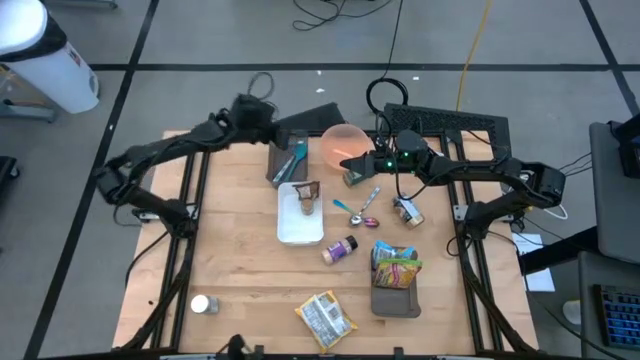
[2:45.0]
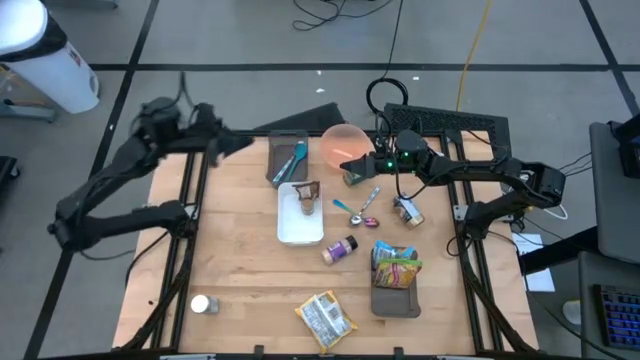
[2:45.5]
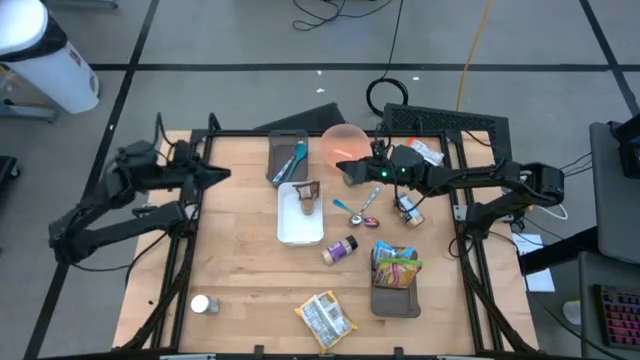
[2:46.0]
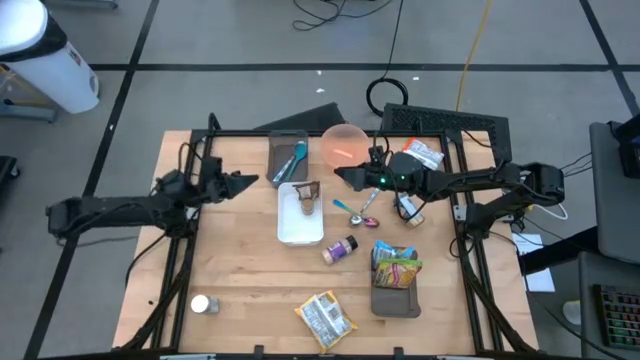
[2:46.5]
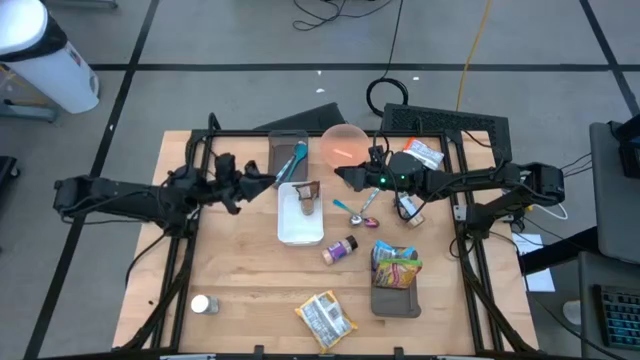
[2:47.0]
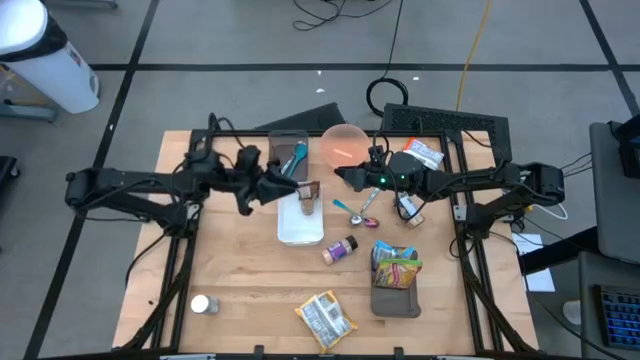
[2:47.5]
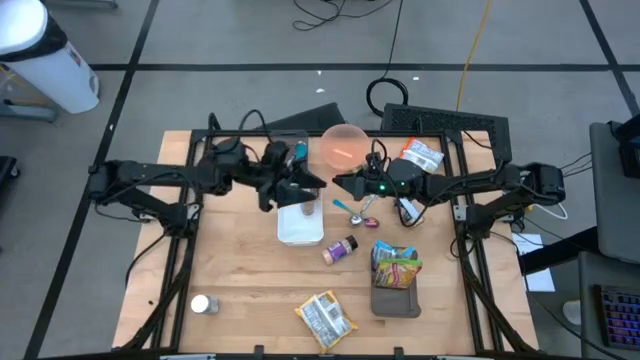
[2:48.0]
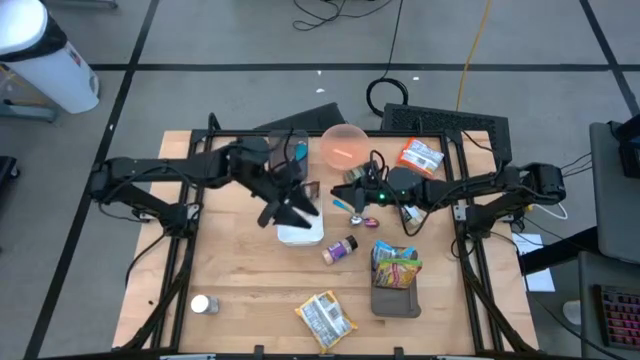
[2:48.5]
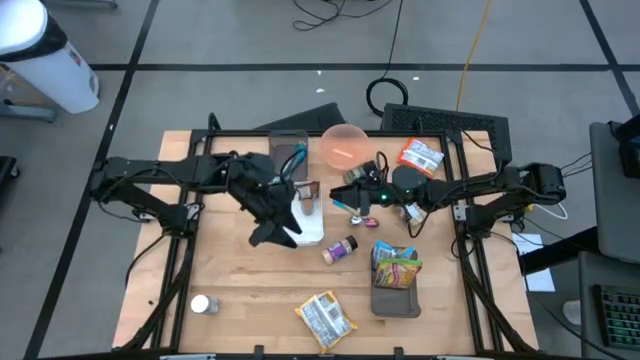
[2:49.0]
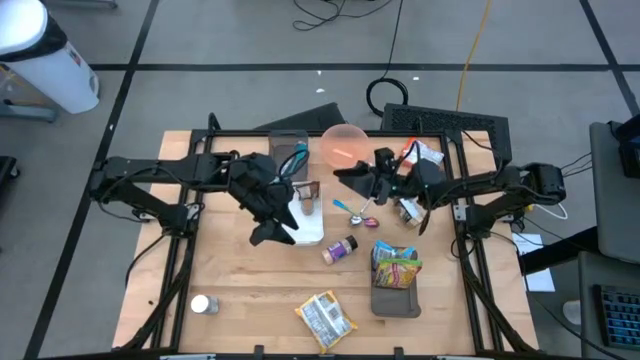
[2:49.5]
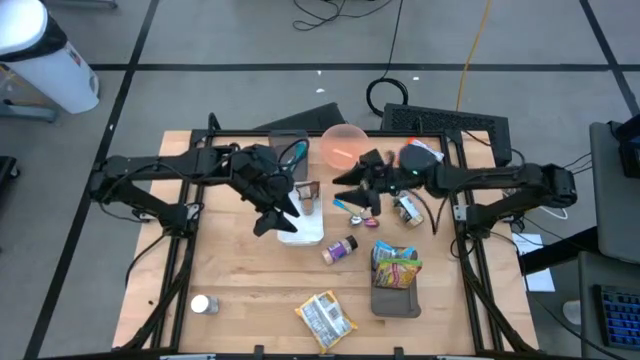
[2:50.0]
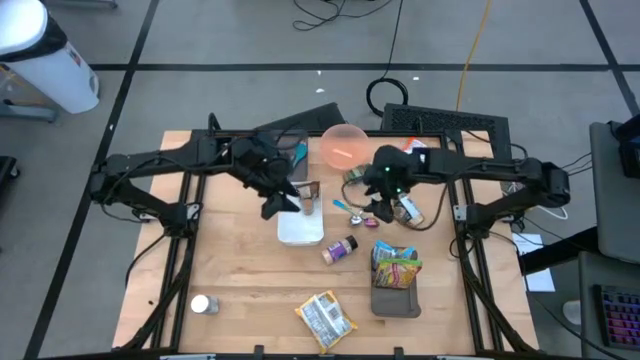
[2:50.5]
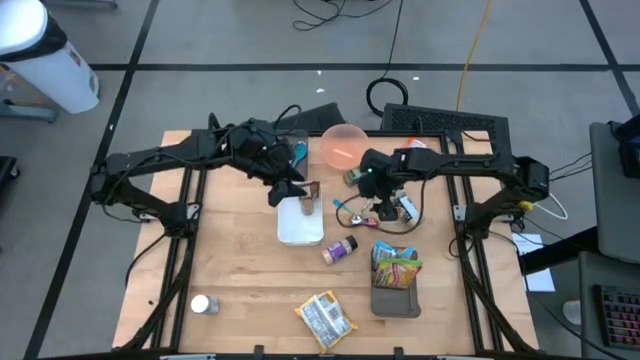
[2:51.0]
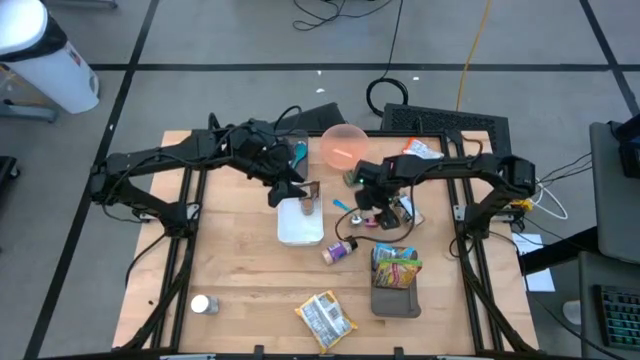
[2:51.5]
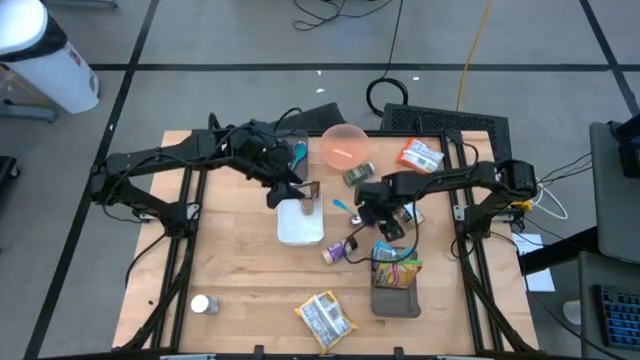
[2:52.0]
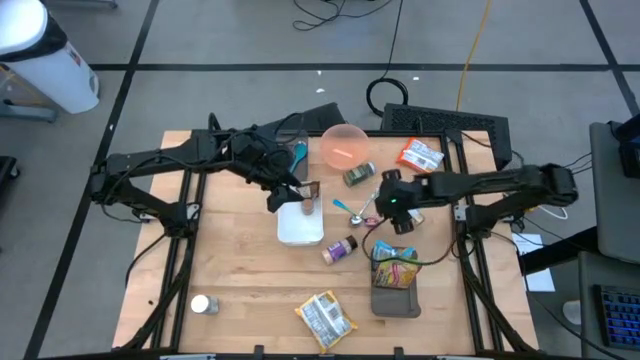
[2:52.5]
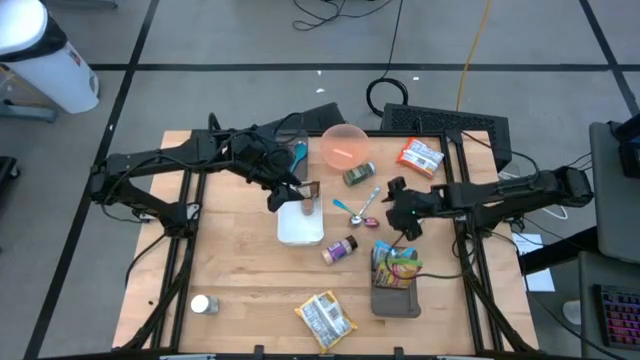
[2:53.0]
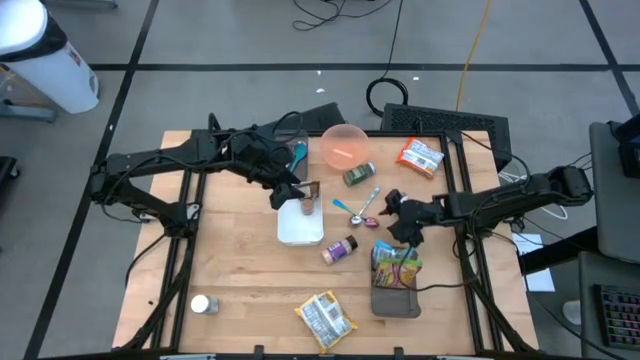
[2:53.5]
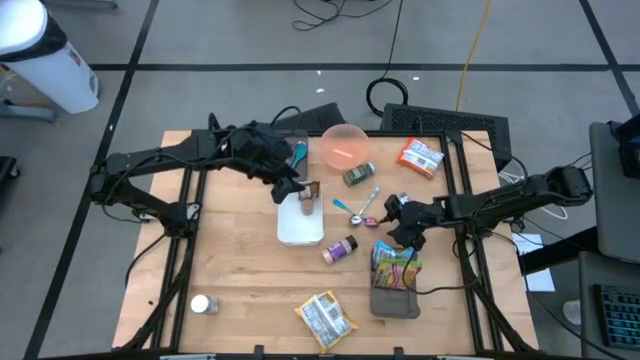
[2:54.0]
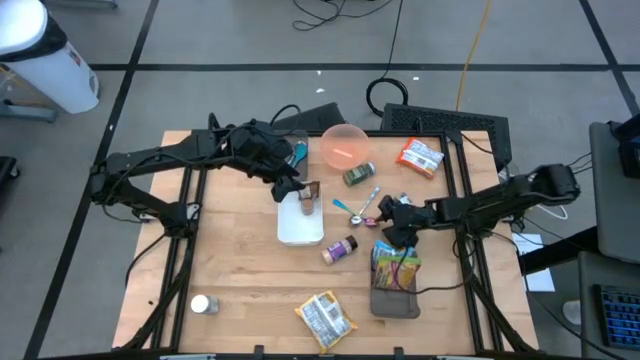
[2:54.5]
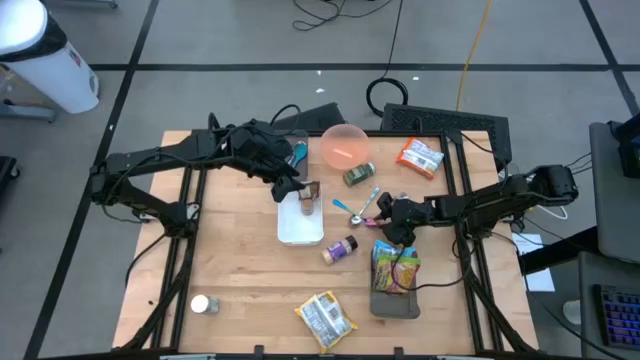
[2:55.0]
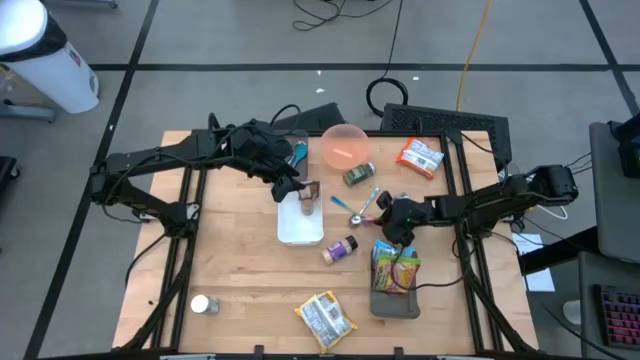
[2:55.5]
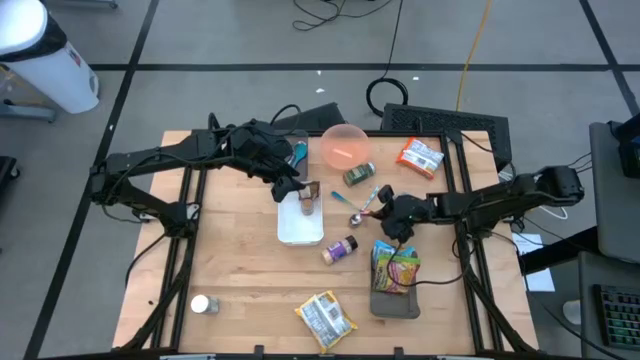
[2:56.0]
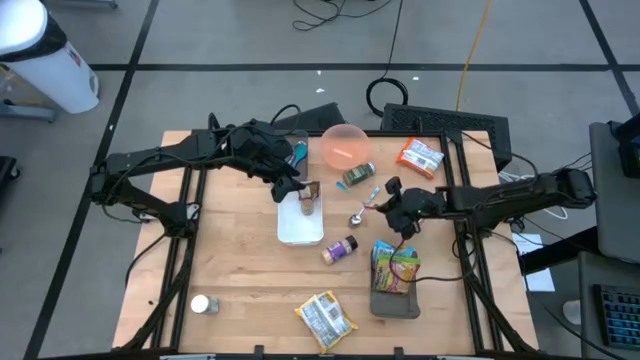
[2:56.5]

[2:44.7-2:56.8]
Task: Pick & Place Food Item
Put the purple spoon into the top black transparent bin

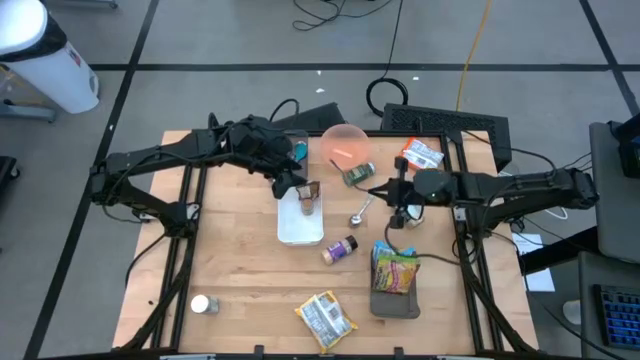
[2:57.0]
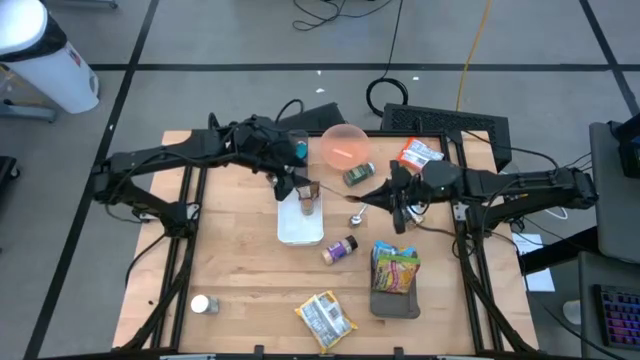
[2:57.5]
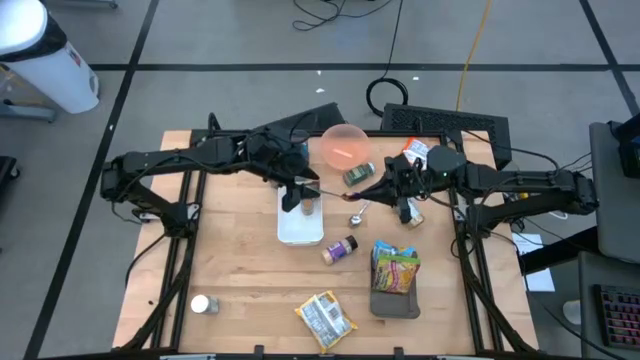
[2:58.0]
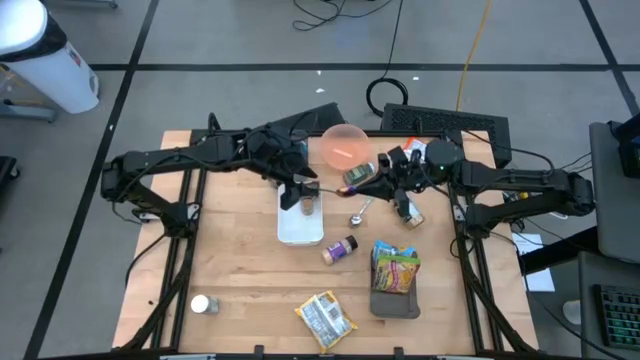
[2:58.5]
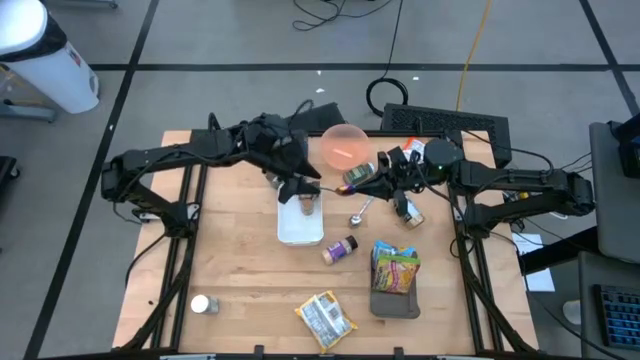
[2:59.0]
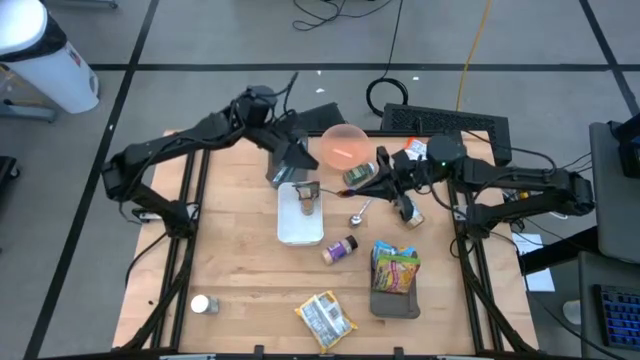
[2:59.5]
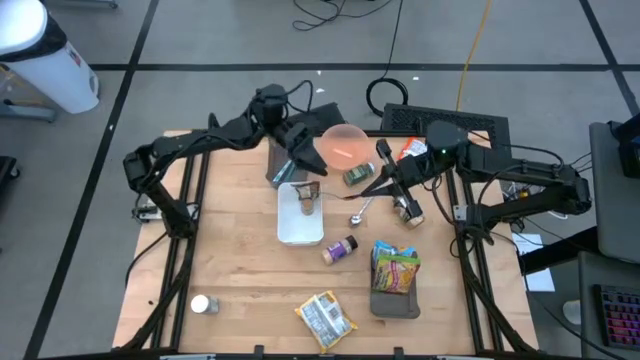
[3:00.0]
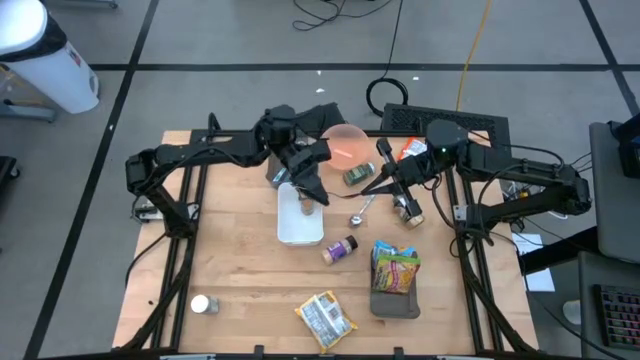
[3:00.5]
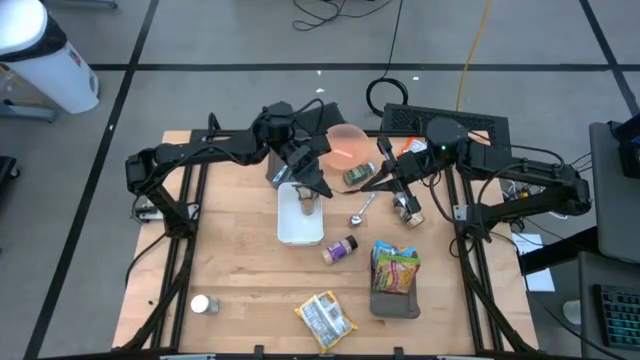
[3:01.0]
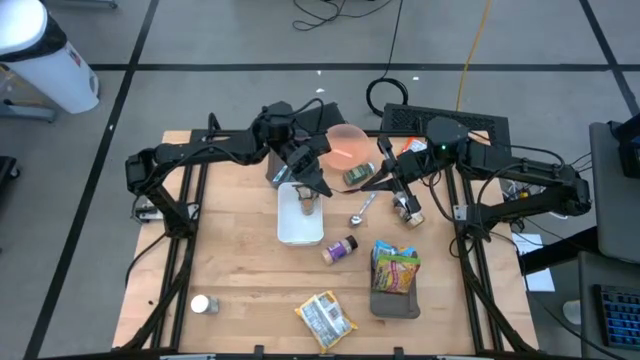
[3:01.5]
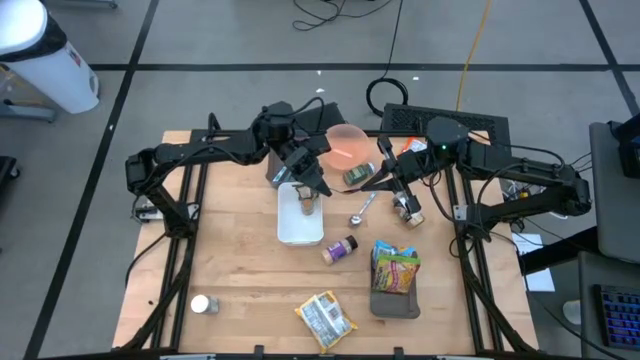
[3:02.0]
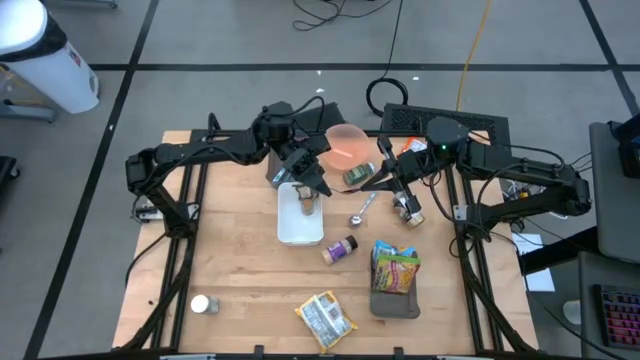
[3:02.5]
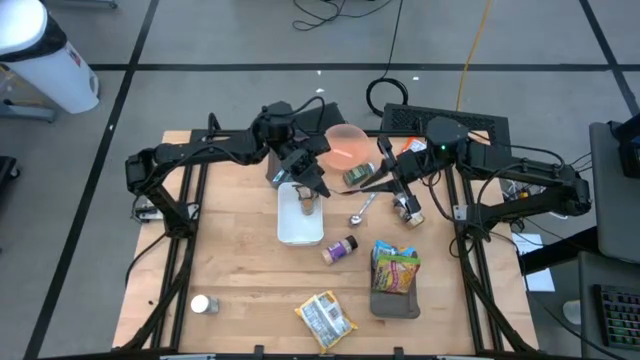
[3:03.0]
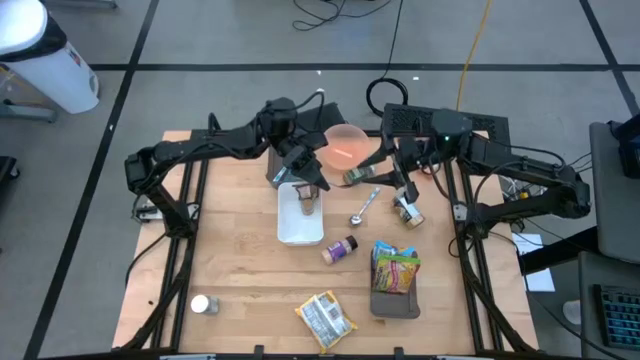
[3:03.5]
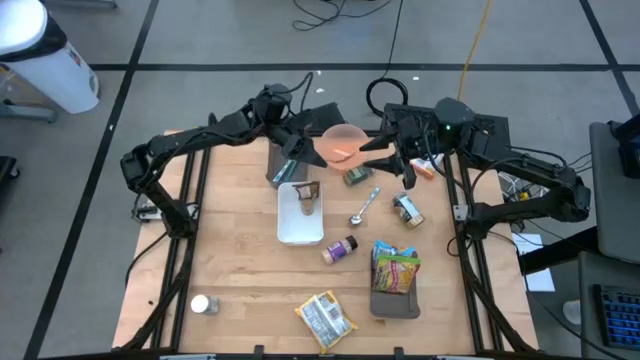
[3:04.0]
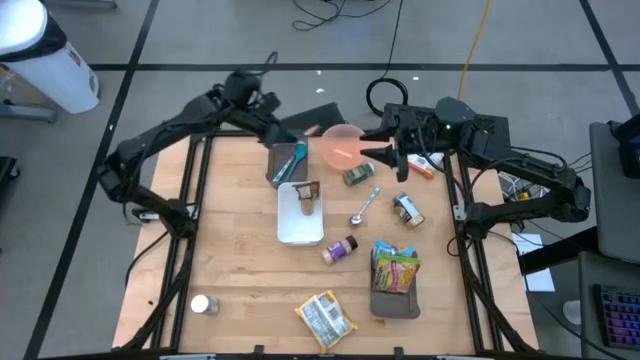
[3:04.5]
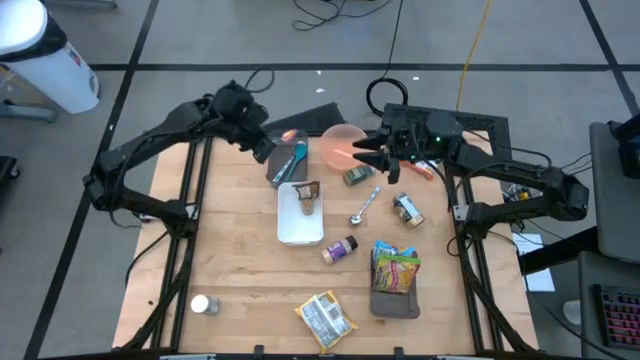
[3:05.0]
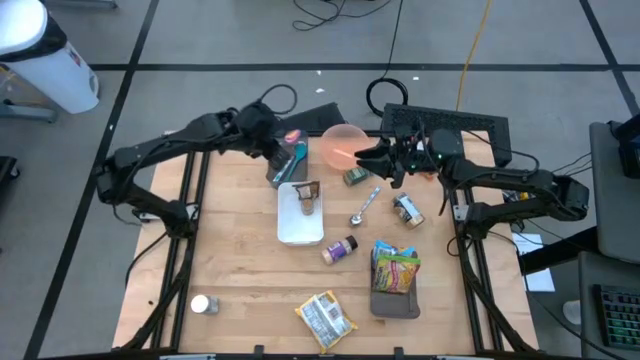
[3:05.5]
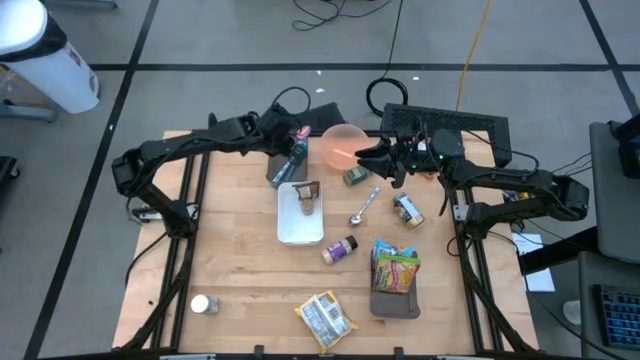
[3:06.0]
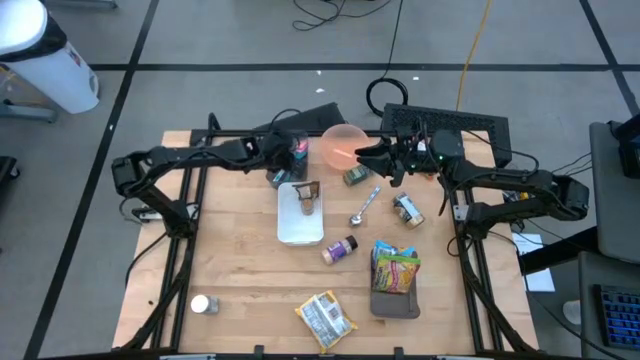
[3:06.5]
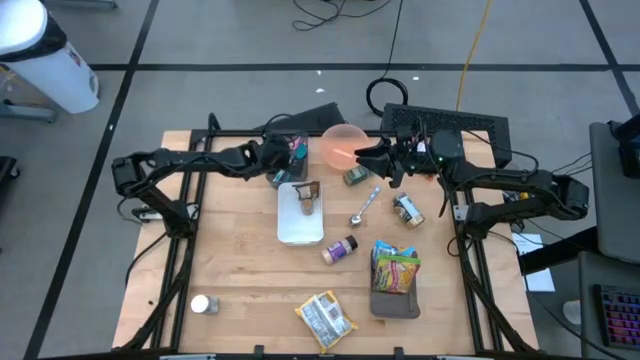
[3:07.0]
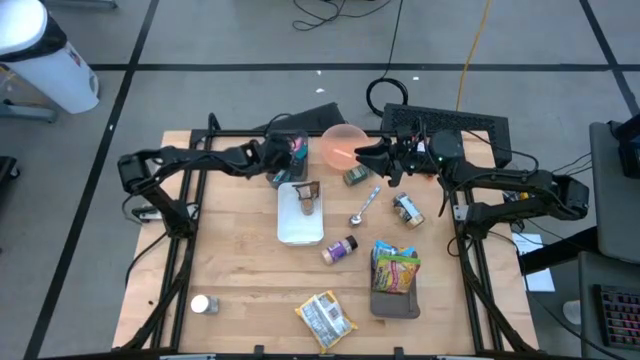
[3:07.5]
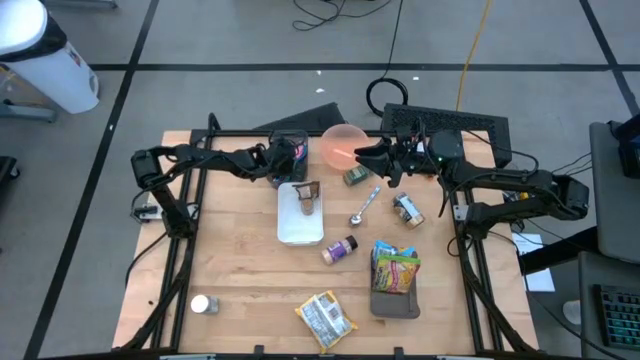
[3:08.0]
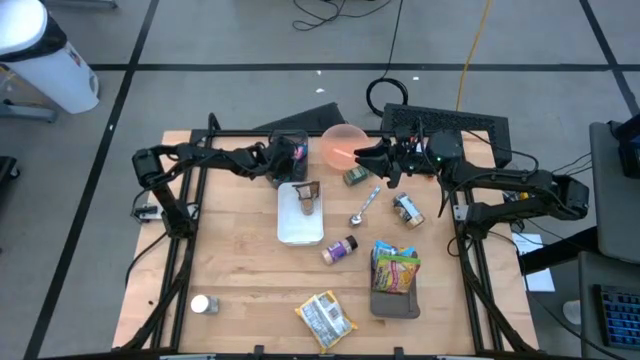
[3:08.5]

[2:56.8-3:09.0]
Put the purple spoon into the top black transparent bin
